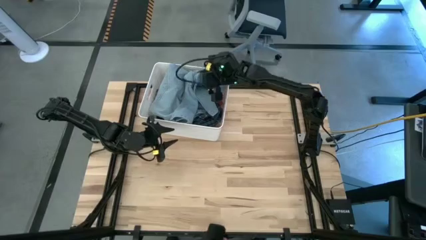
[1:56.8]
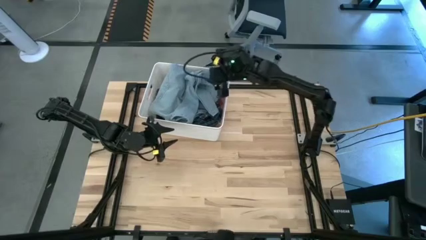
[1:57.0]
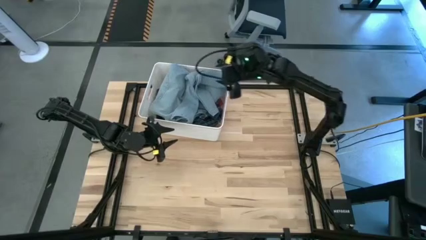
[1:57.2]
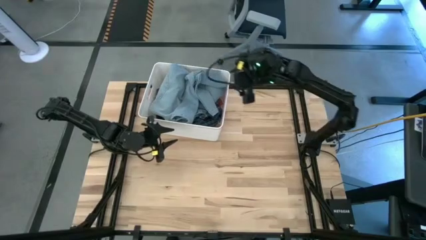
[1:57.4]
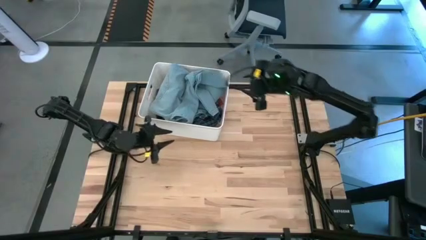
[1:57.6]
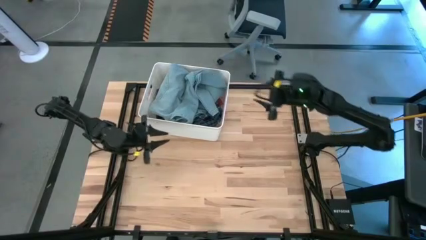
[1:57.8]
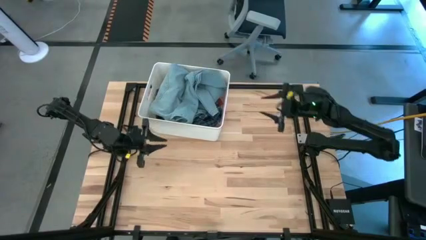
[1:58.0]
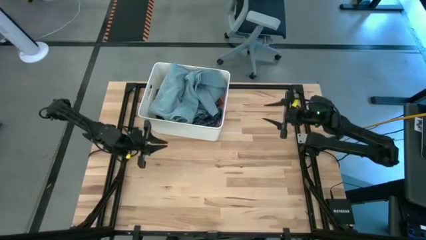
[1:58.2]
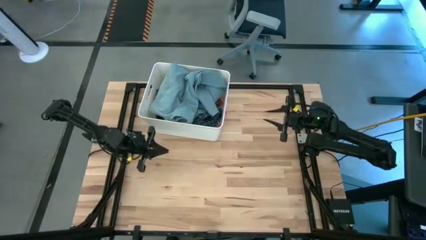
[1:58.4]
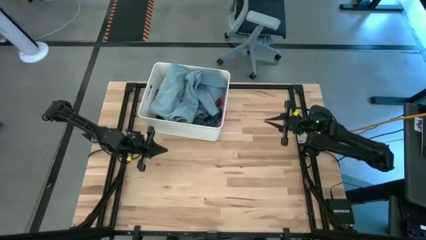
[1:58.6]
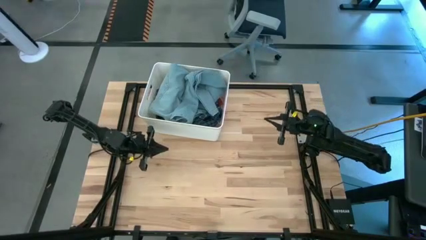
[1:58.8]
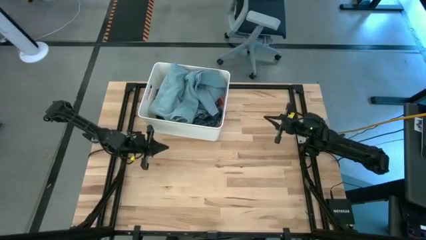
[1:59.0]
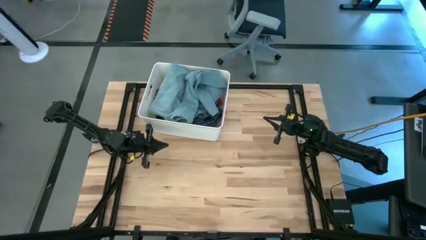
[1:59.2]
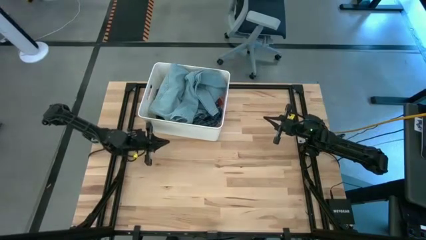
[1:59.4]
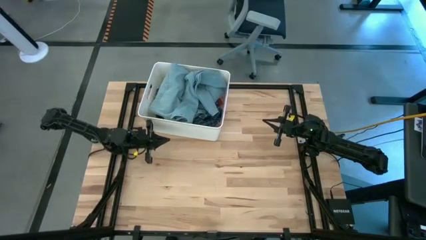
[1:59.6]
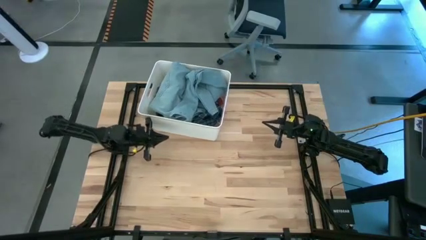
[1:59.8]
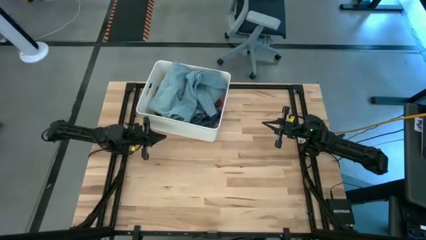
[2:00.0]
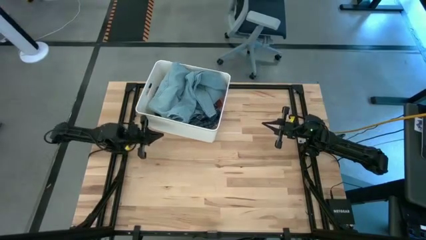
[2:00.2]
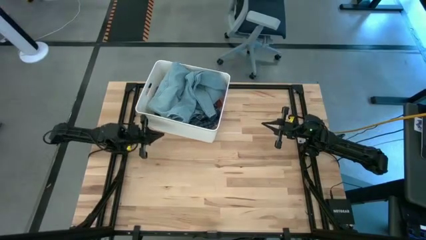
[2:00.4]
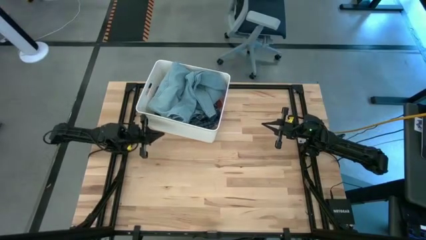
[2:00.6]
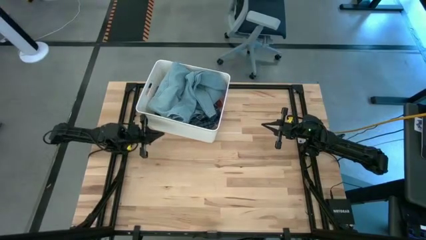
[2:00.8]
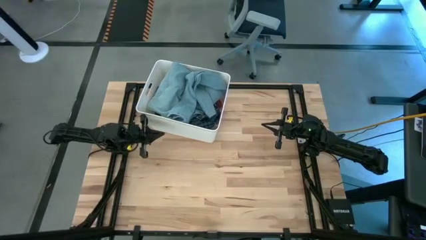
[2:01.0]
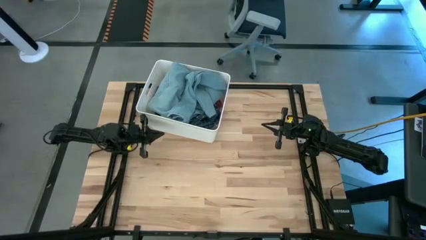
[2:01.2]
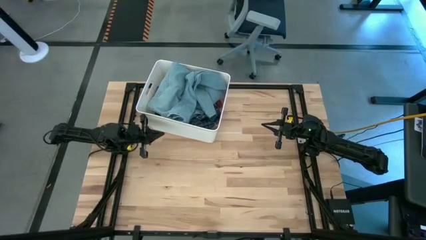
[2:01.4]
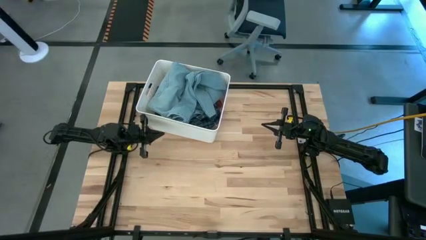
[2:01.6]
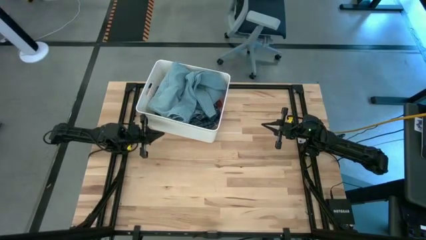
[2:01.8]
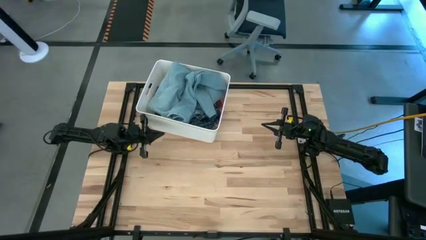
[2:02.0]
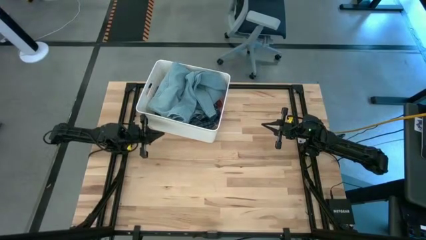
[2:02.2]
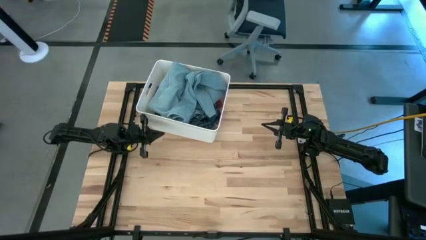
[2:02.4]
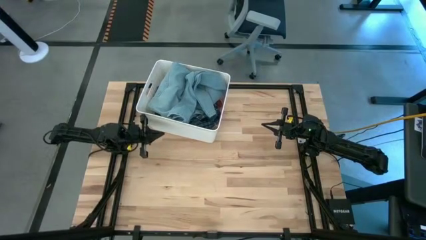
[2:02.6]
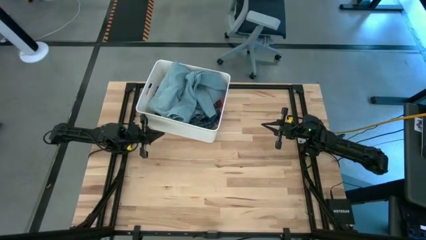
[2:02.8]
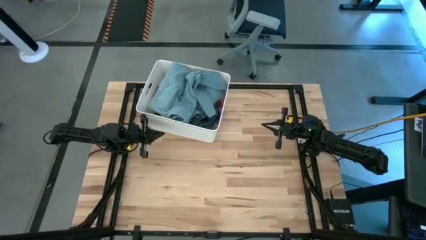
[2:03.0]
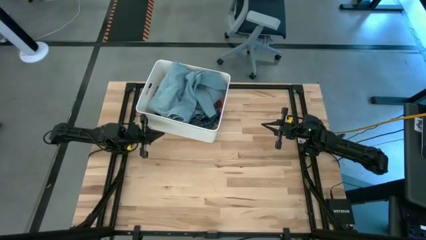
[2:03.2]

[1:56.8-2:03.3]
Task: Sort clothes
Return to Home Position

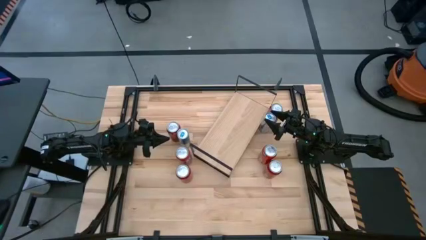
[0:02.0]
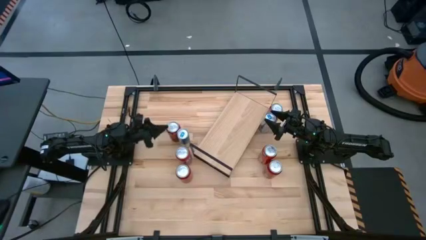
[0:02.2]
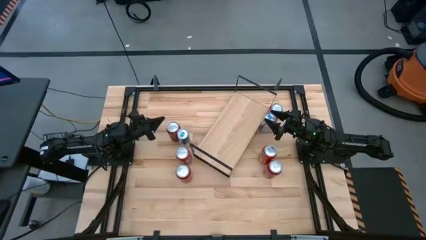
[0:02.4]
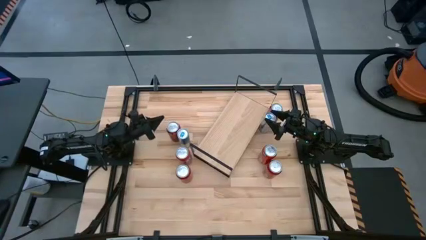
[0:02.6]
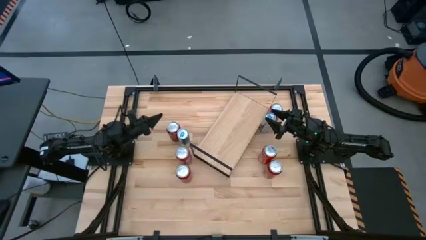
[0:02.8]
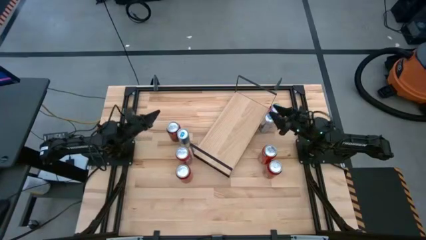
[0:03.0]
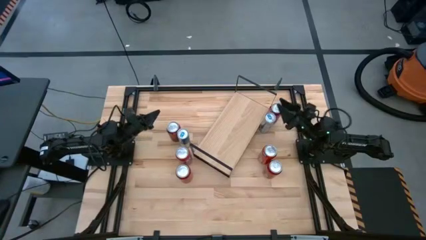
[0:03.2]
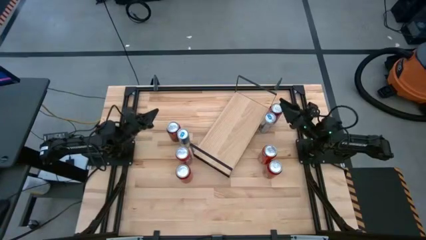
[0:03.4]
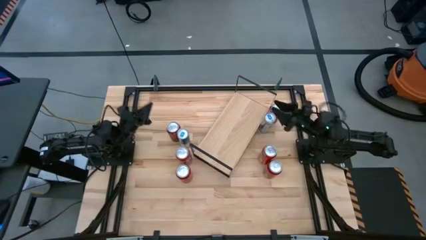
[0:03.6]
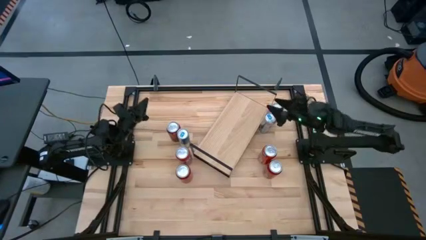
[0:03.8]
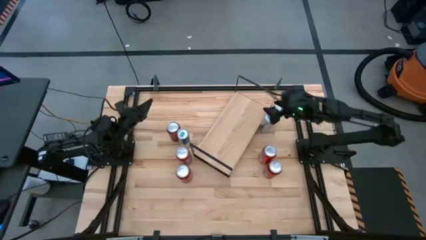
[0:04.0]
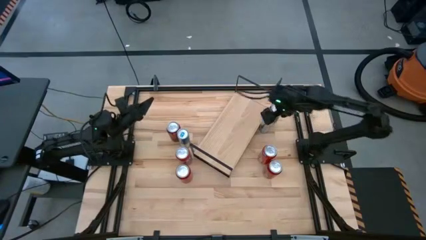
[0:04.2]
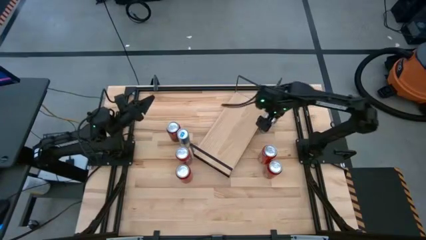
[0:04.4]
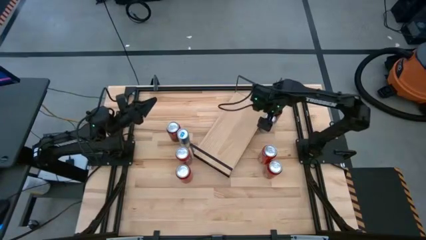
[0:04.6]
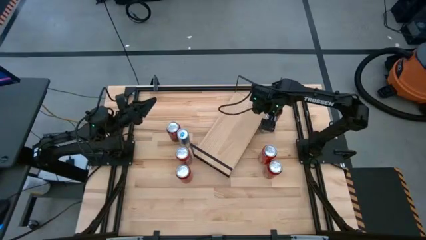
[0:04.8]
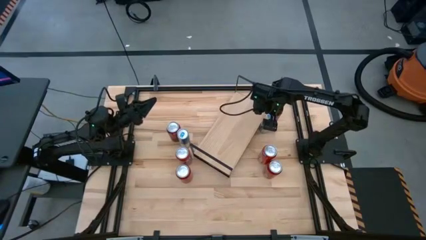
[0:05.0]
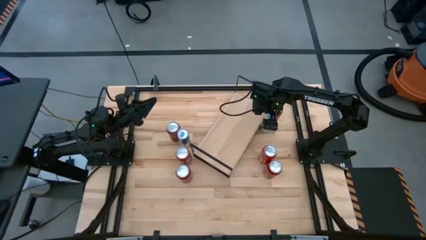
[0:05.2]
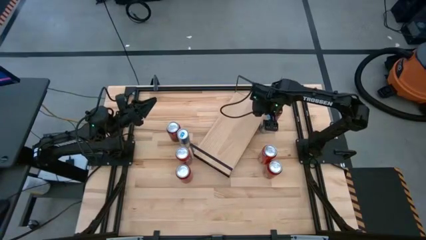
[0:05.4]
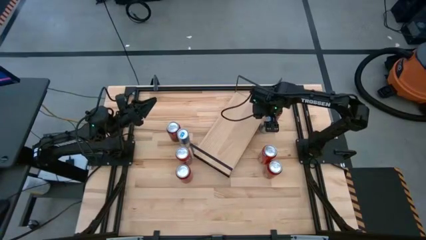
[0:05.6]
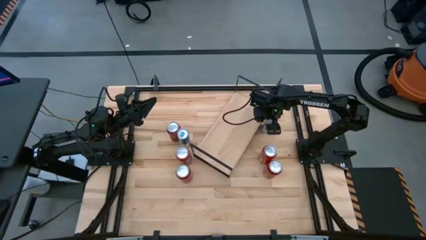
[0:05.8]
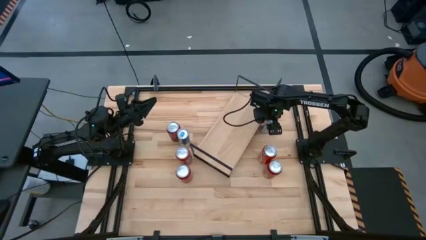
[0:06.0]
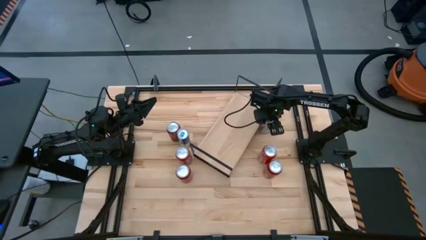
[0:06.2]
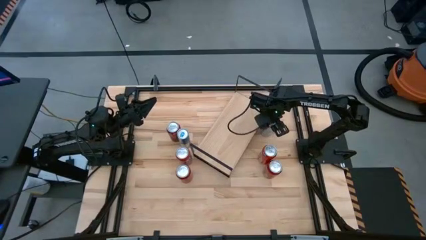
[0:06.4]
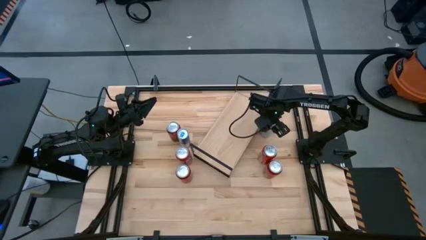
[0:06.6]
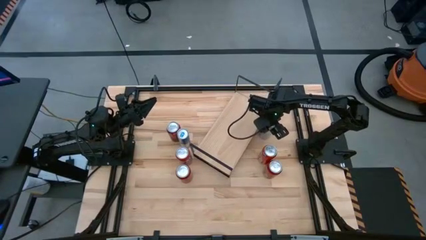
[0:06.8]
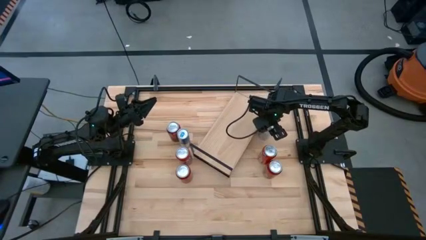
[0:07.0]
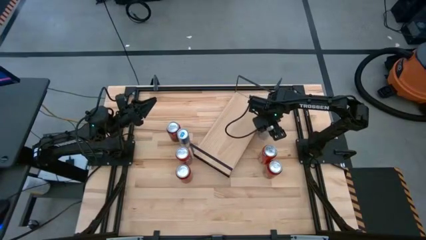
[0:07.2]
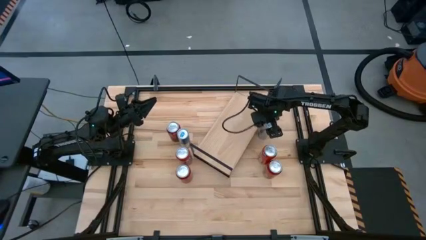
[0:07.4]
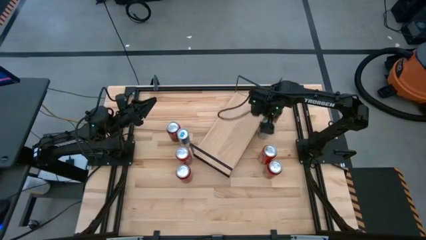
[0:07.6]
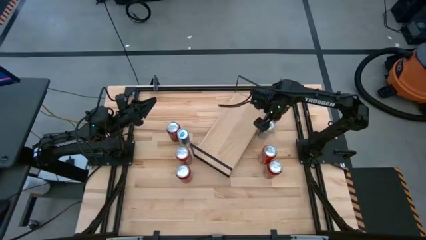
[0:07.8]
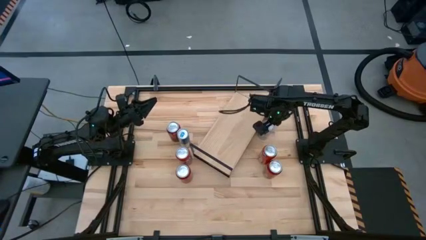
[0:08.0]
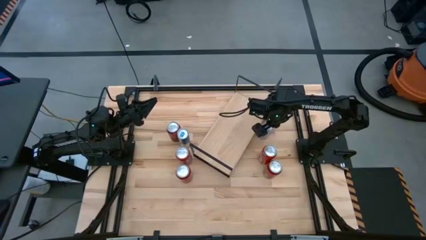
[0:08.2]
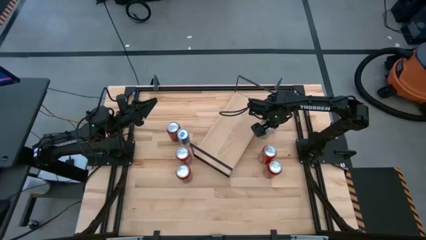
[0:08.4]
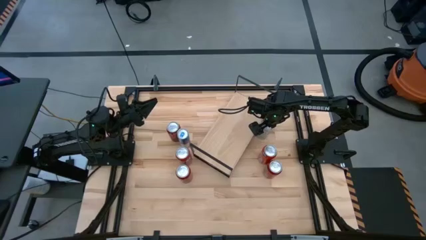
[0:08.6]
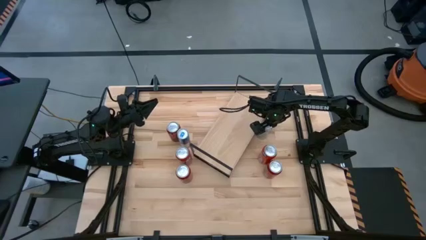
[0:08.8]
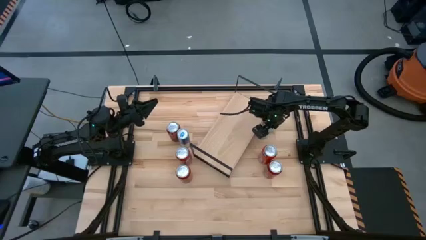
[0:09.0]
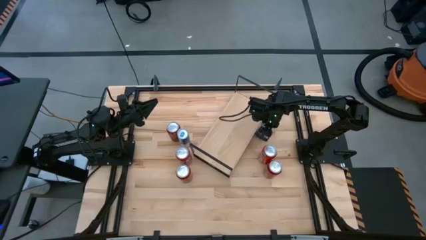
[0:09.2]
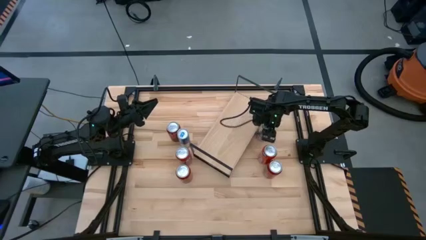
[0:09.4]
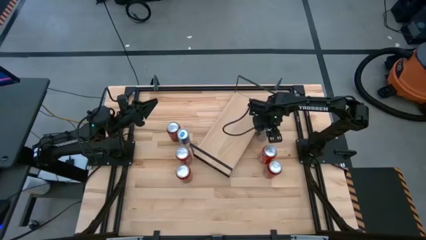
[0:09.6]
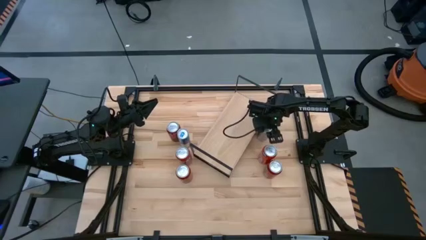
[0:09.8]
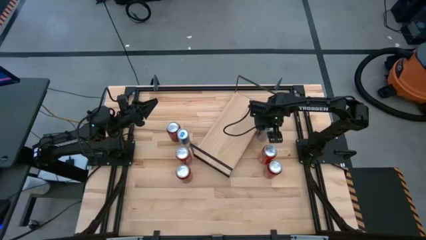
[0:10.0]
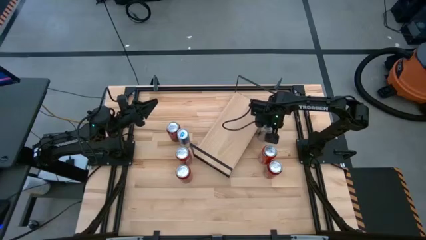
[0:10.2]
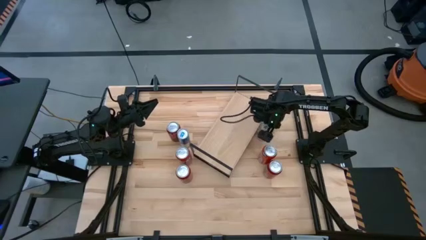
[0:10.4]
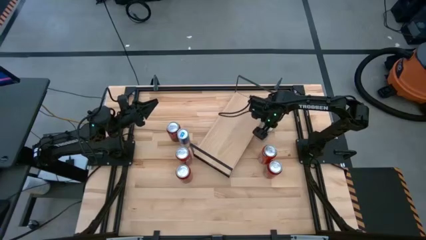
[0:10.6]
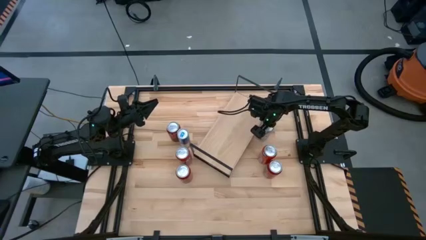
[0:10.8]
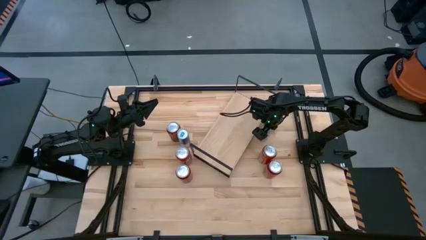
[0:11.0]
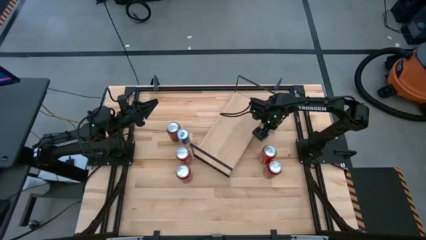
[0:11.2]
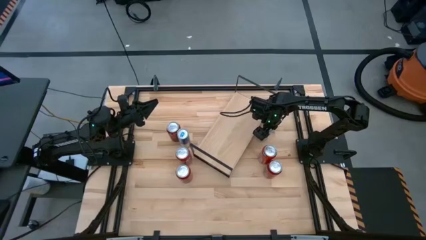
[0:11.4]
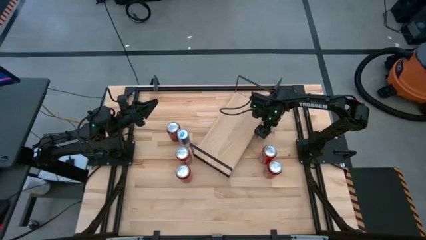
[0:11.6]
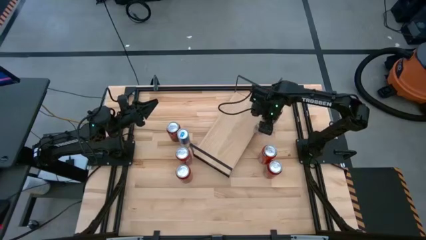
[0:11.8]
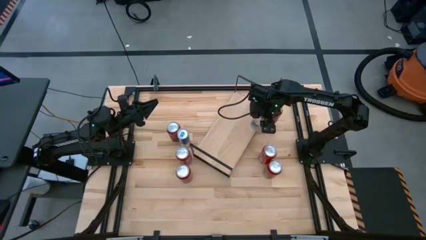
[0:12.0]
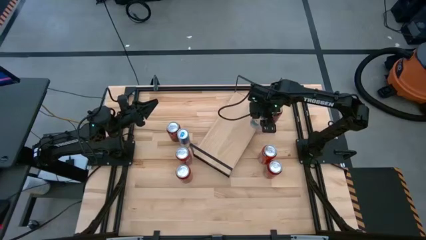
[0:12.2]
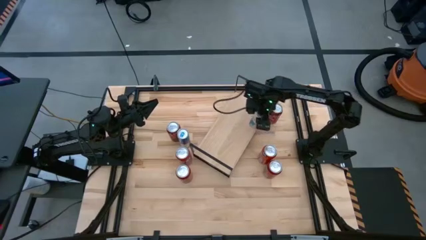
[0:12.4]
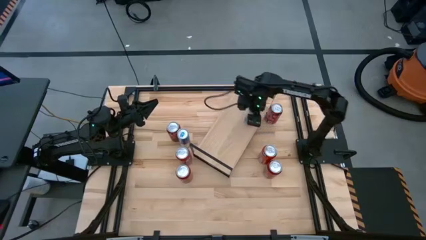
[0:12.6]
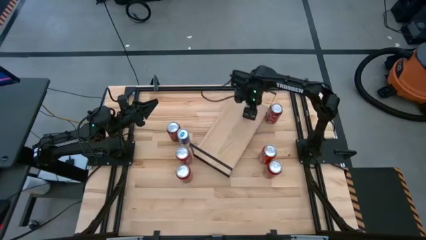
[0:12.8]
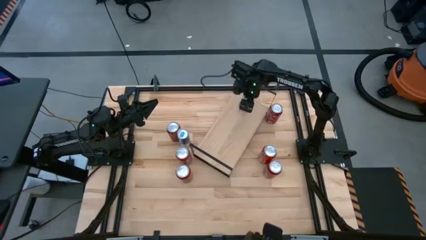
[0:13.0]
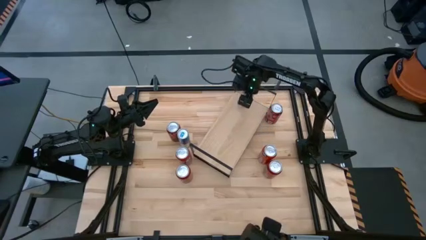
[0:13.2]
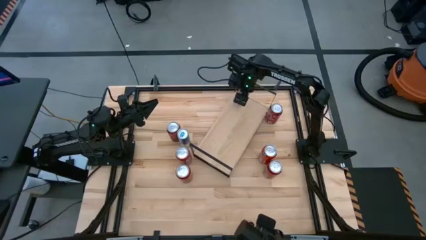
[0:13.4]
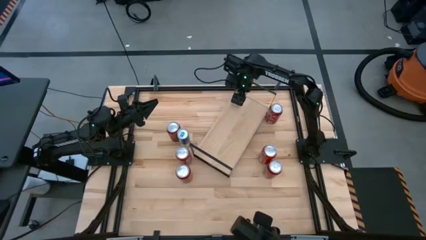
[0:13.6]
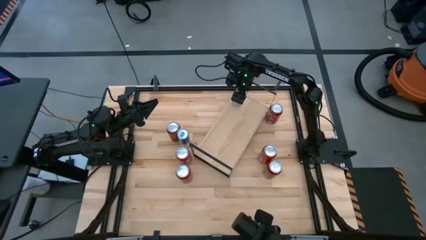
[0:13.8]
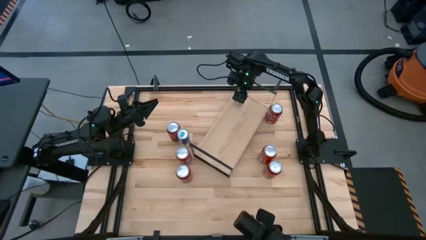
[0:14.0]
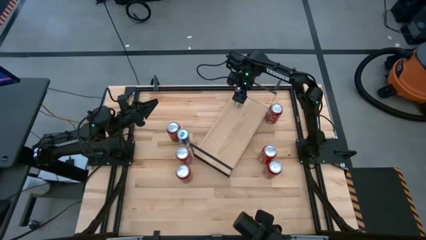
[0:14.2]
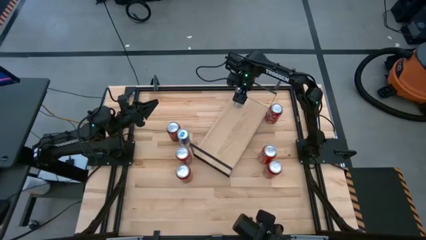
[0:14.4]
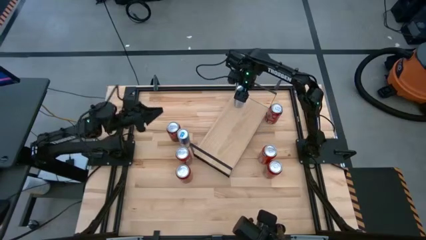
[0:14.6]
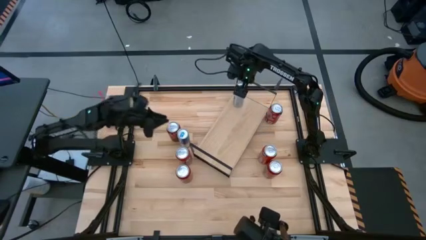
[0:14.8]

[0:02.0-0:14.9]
Task: Place canned beverage on shelf
Put the right blue soda can on the shelf
